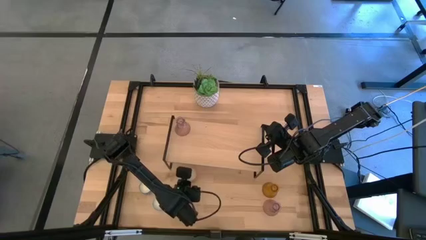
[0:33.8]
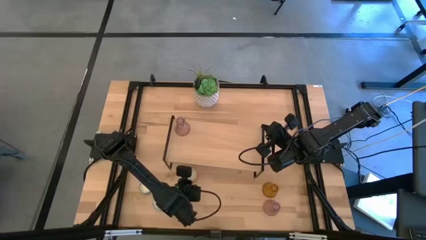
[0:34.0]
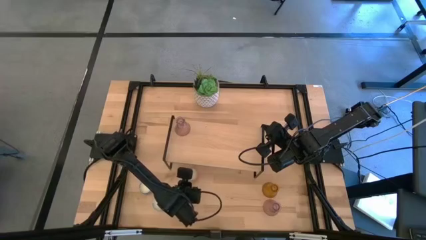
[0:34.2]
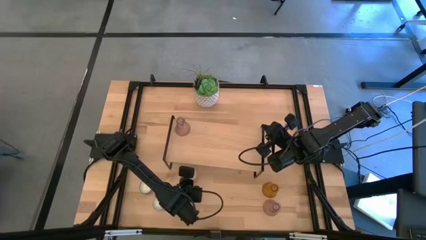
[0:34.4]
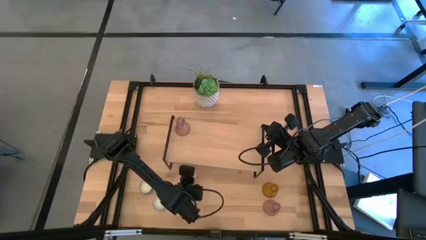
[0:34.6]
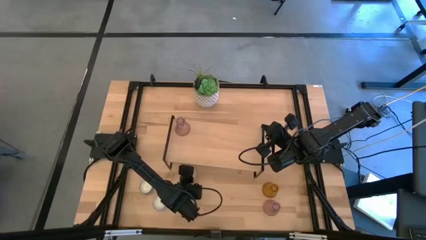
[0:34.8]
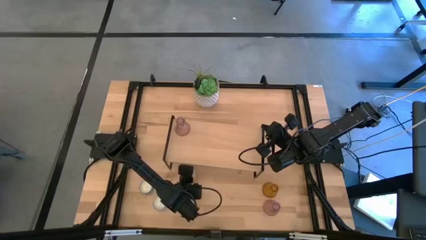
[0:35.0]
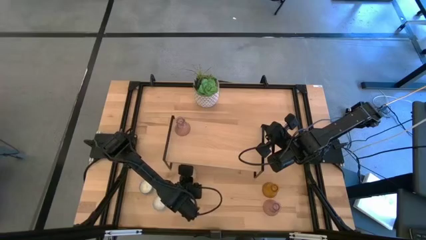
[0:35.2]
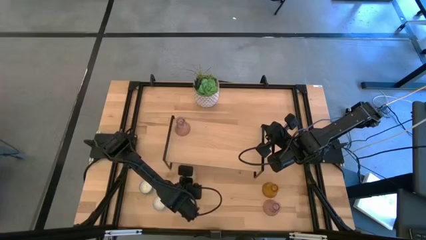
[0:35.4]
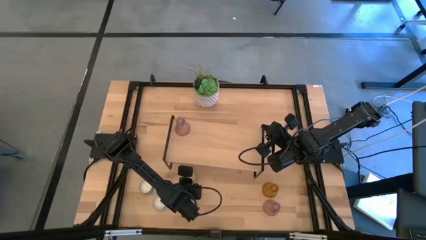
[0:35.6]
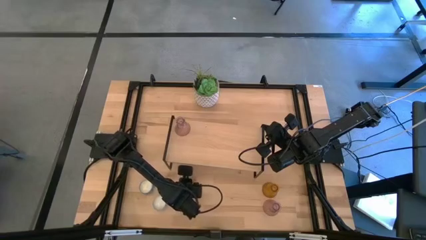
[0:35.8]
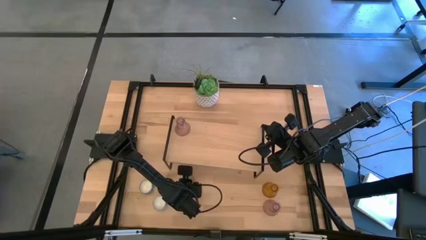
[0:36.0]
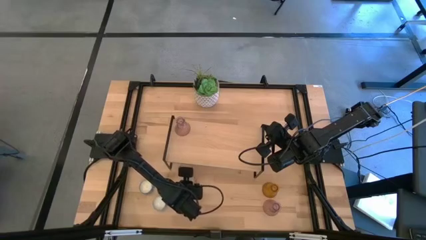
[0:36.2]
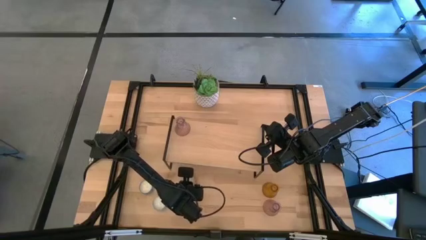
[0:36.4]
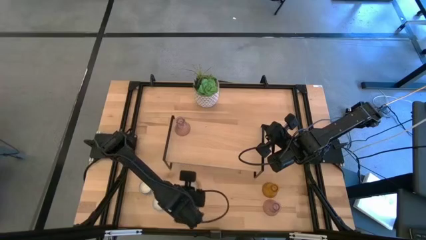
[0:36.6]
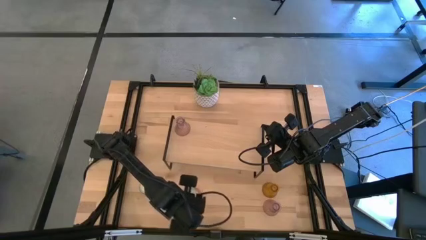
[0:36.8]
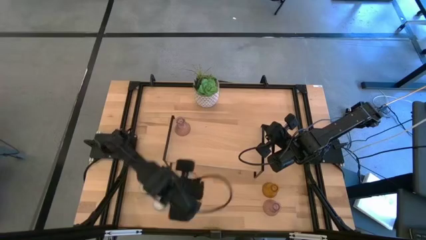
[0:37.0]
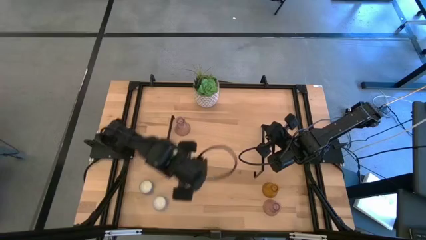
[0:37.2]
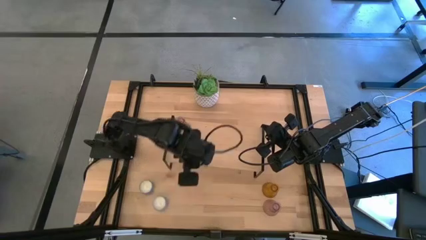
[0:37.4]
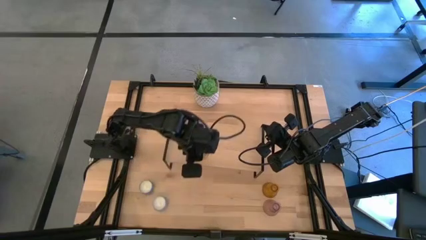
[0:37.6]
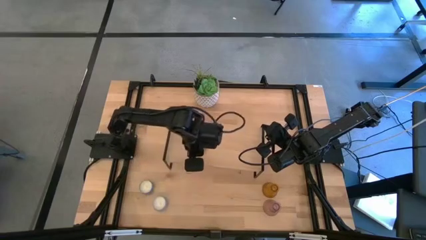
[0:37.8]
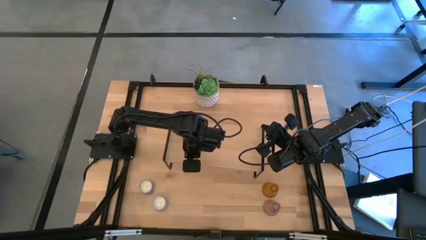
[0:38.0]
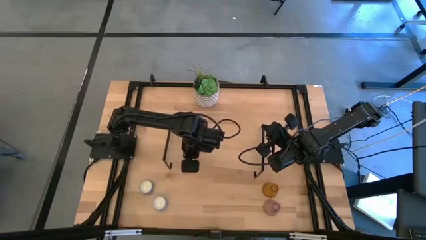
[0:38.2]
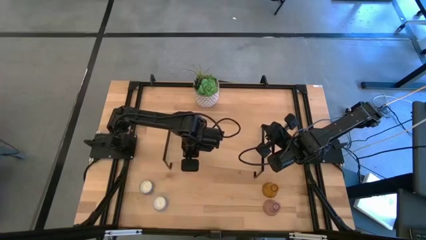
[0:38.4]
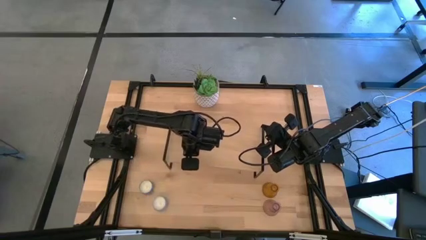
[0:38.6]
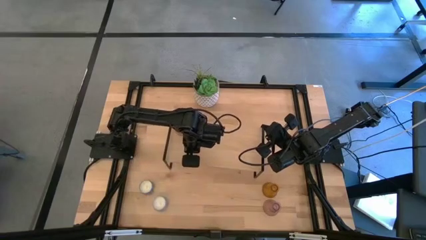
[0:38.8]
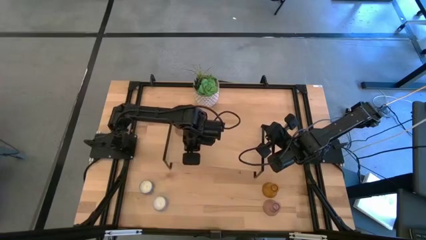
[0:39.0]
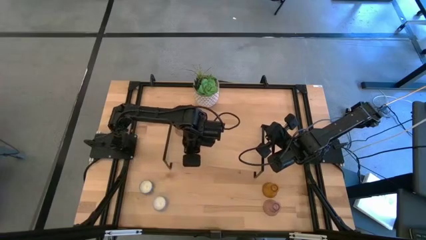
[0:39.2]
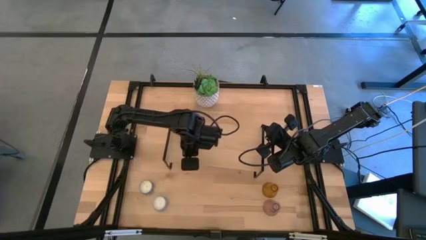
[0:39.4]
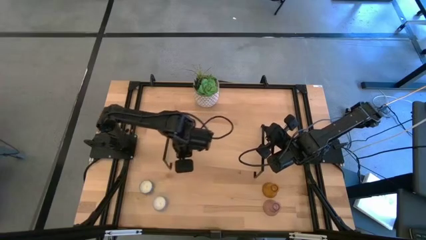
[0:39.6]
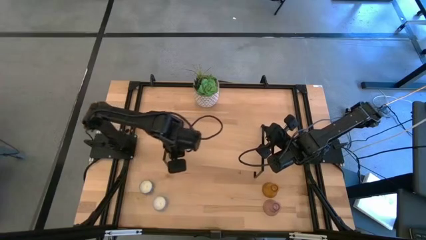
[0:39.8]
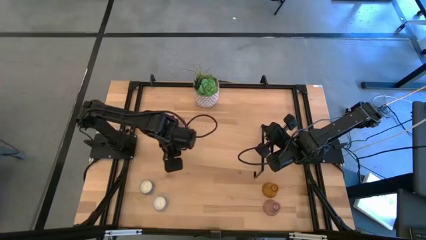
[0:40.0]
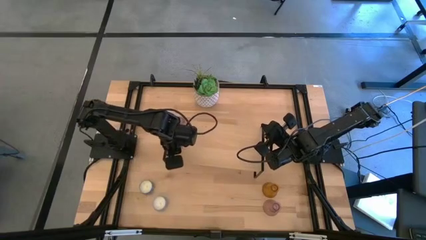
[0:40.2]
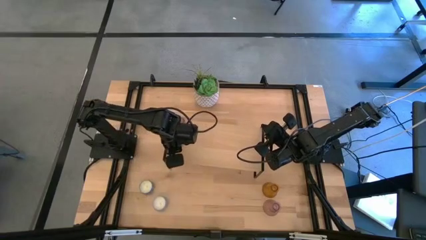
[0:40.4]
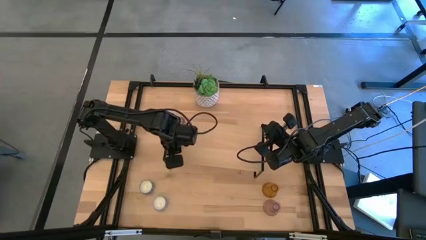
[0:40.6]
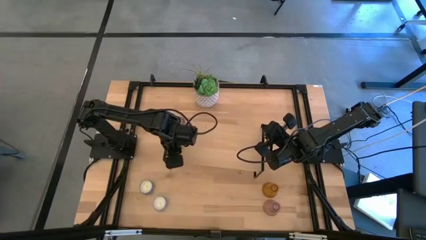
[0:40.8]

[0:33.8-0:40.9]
Task: Pick & Place candle stick holders
Put the yellow scented candle on the shelf

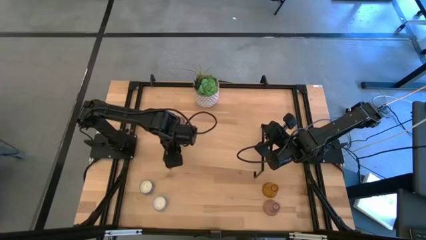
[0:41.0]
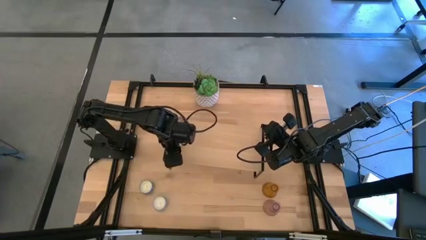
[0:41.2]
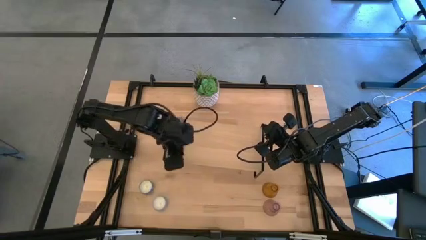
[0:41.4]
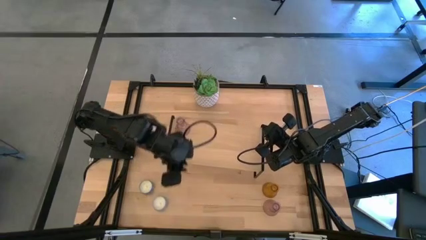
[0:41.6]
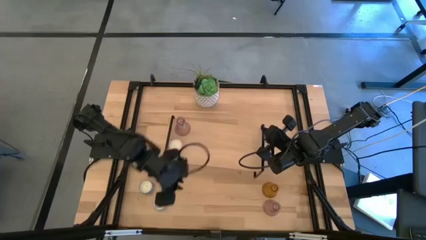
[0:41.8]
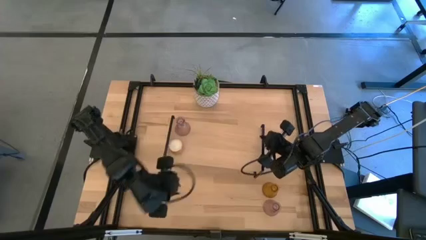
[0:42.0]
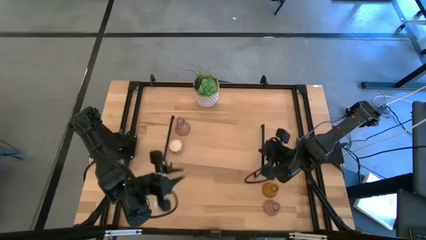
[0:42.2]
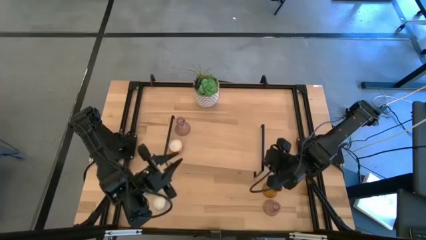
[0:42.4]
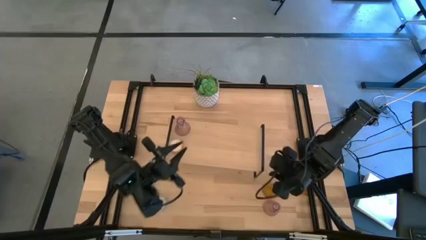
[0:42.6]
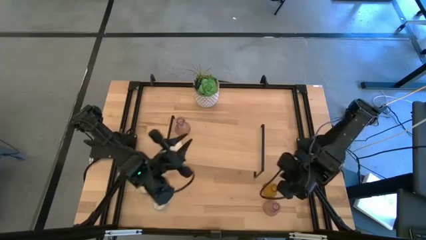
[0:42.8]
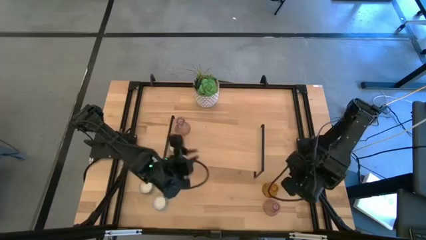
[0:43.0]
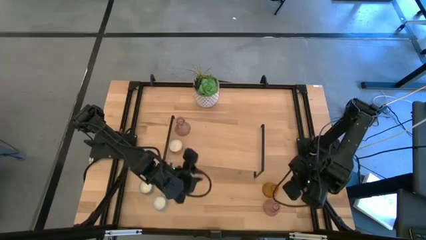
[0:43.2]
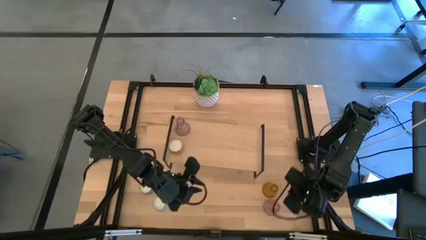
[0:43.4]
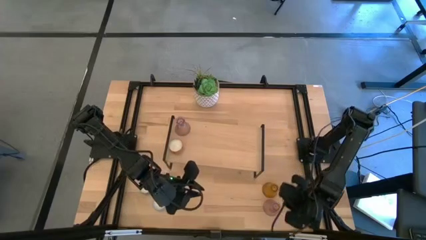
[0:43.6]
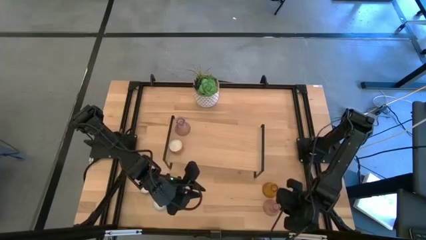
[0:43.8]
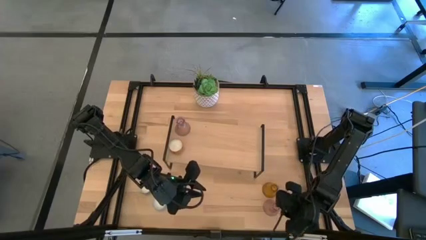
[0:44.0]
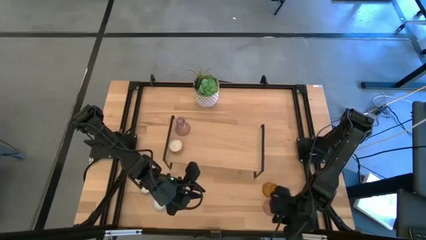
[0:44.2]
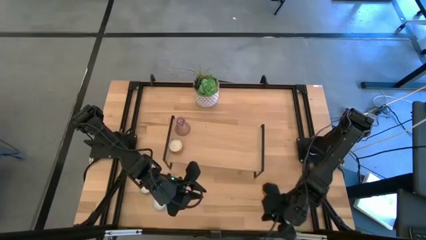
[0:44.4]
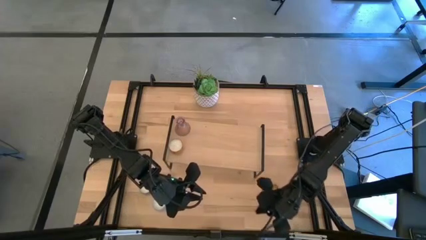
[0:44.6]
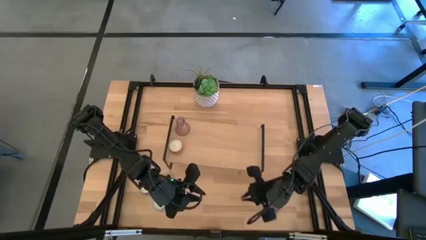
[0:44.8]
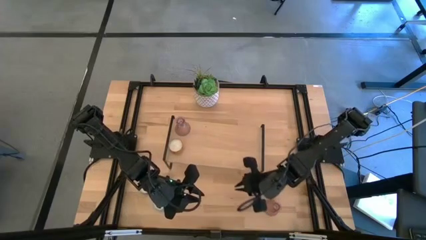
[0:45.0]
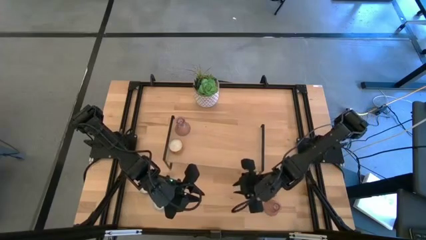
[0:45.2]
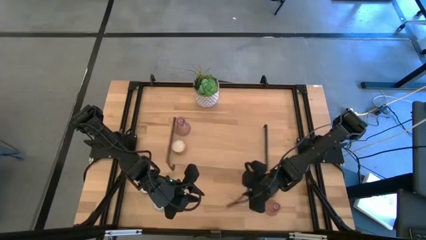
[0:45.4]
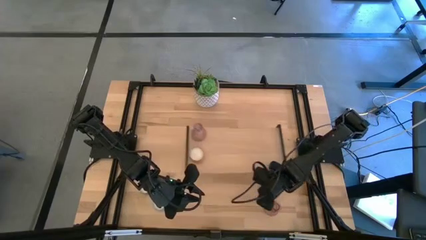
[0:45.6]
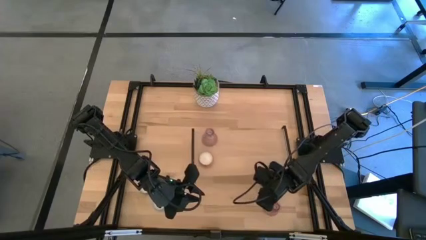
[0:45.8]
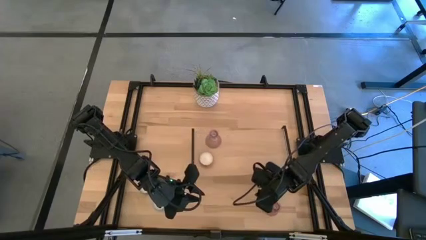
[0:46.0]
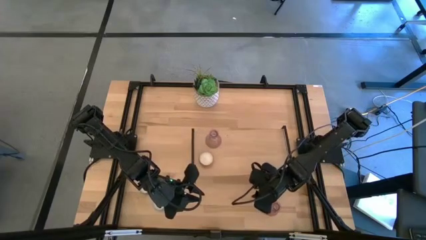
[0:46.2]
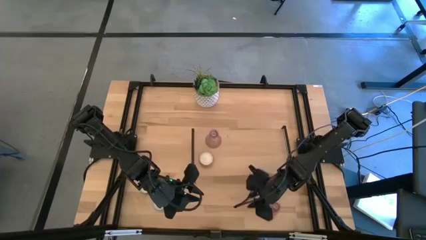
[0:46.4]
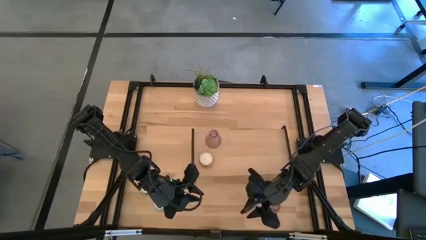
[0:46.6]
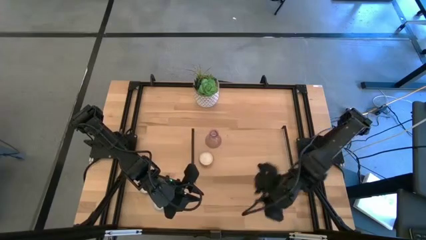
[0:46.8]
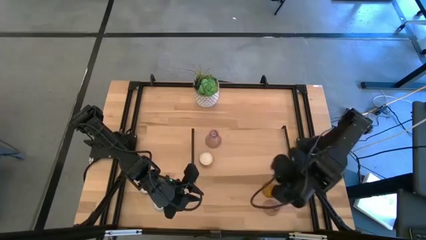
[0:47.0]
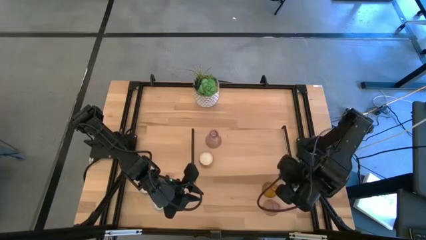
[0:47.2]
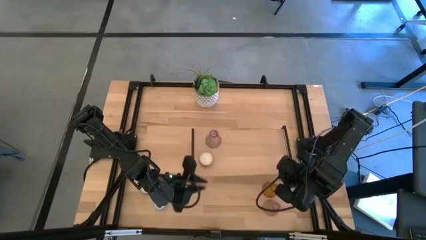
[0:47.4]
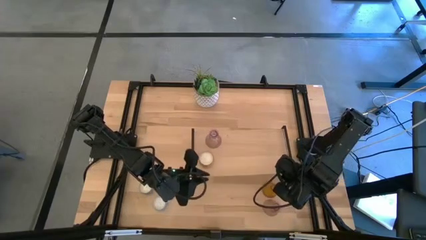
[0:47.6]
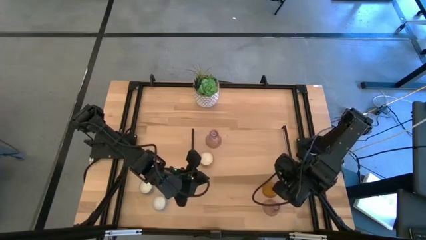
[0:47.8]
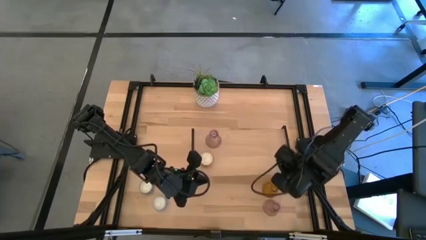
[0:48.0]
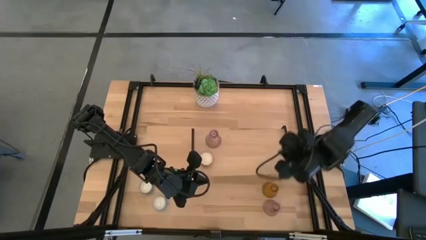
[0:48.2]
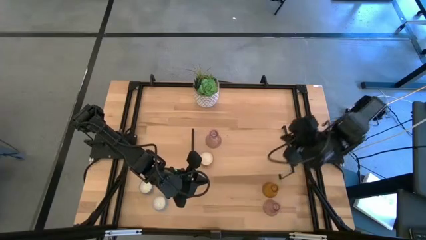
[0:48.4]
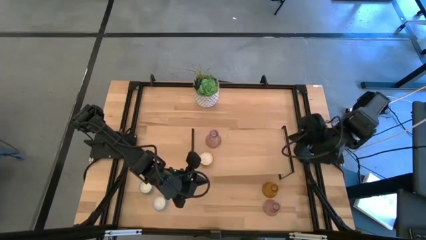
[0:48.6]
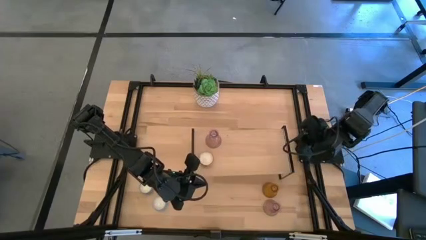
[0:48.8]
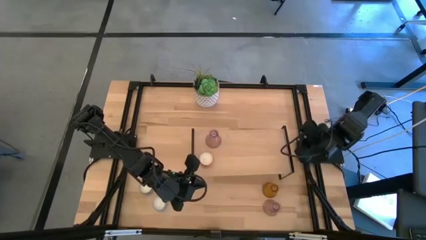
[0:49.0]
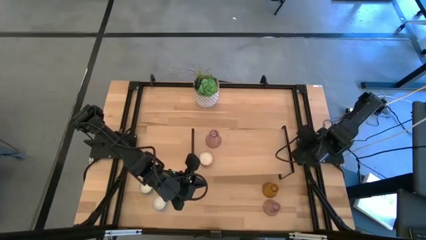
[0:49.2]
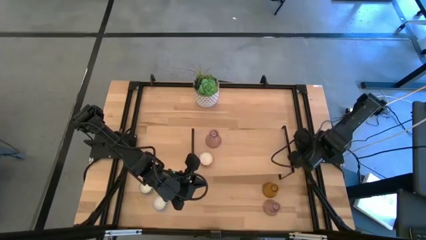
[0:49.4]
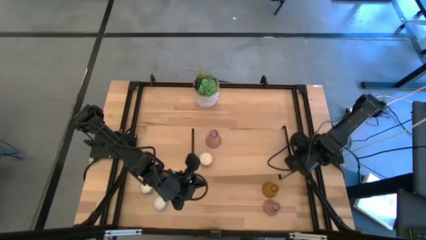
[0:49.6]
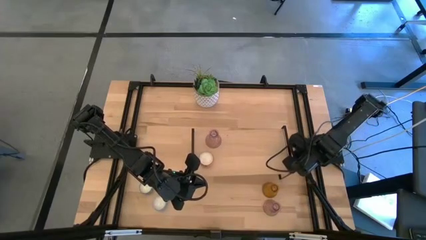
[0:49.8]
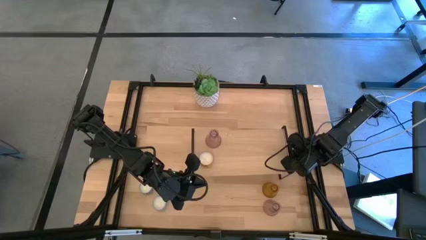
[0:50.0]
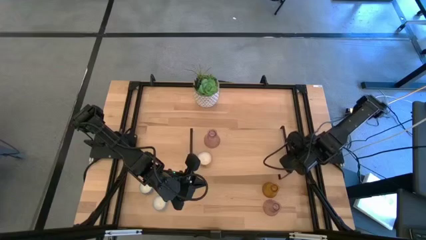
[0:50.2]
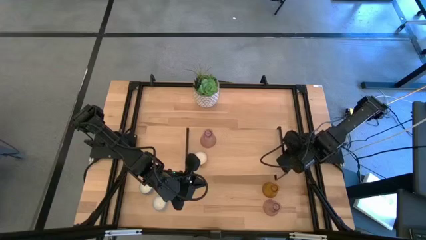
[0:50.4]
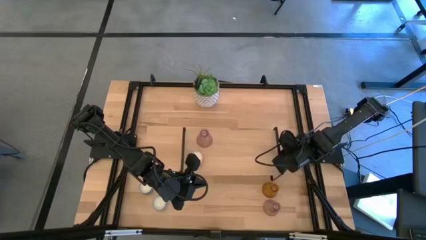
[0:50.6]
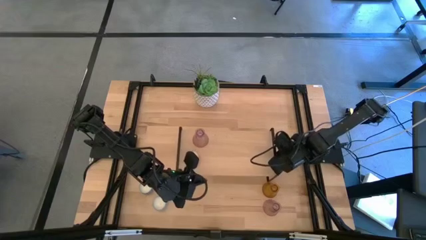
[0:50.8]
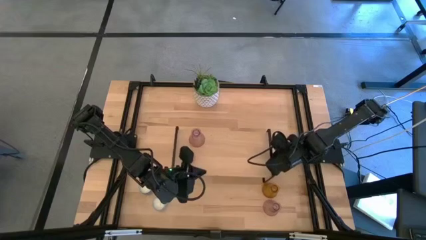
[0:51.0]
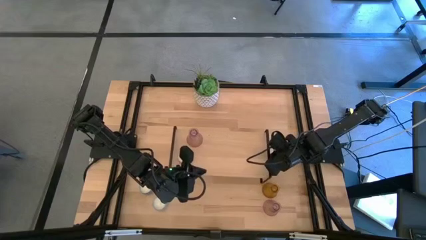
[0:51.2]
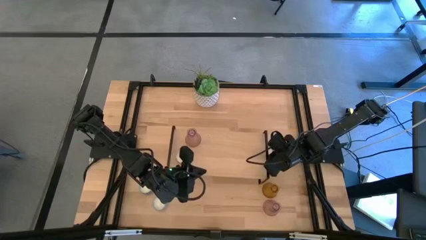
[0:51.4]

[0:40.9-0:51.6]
Adjust the shelf
